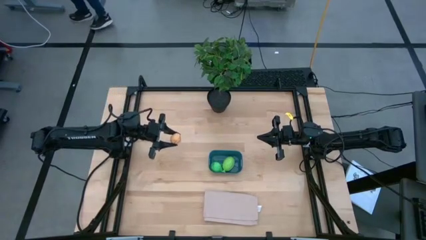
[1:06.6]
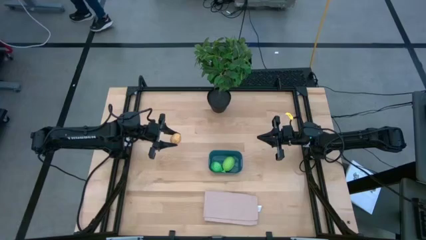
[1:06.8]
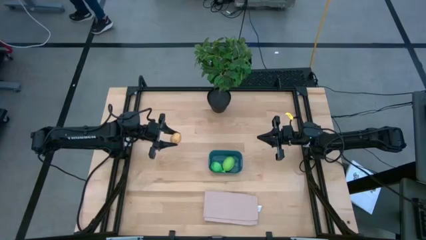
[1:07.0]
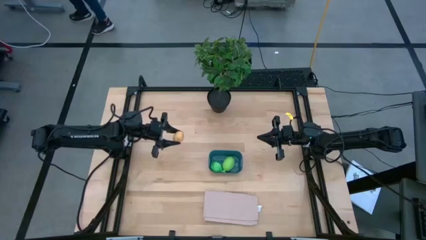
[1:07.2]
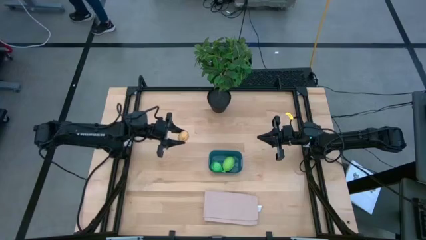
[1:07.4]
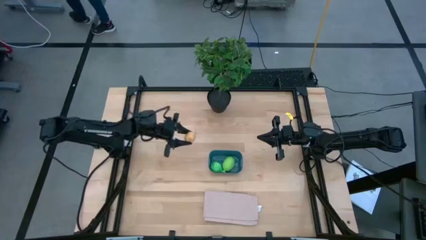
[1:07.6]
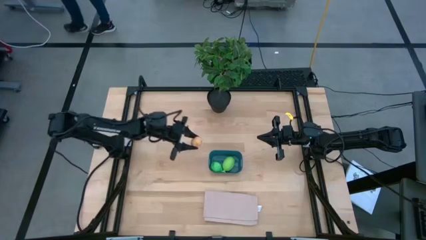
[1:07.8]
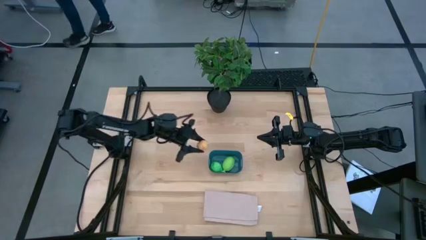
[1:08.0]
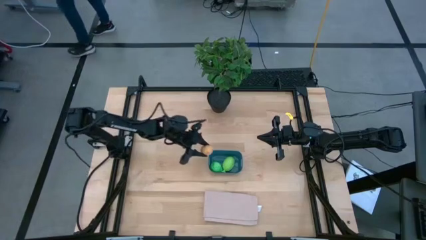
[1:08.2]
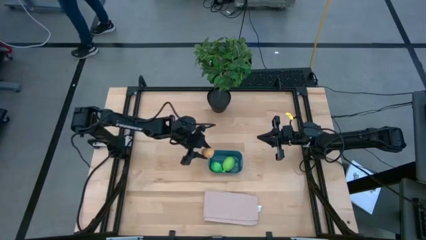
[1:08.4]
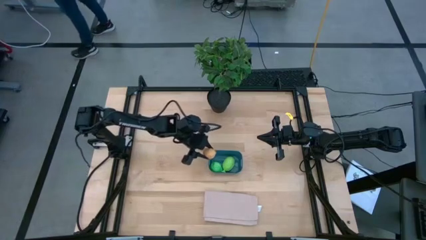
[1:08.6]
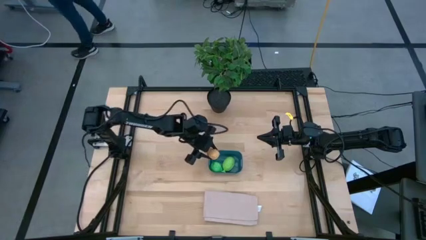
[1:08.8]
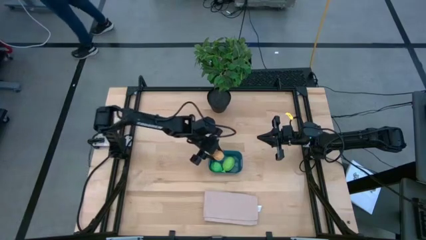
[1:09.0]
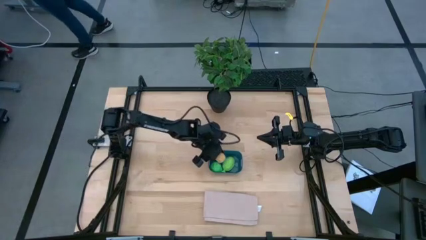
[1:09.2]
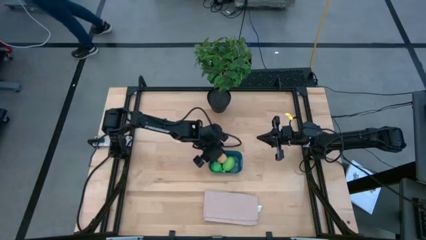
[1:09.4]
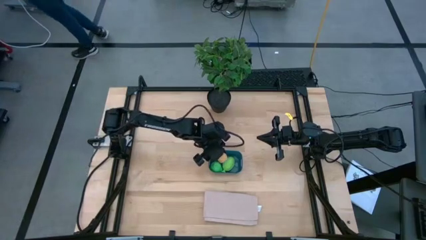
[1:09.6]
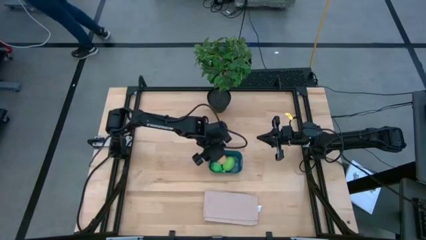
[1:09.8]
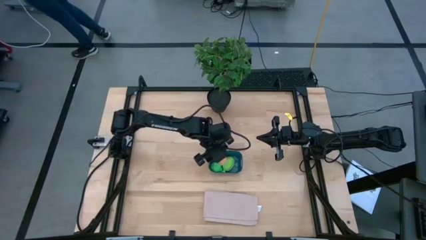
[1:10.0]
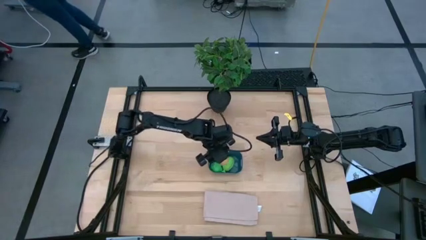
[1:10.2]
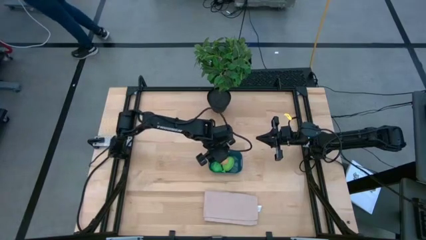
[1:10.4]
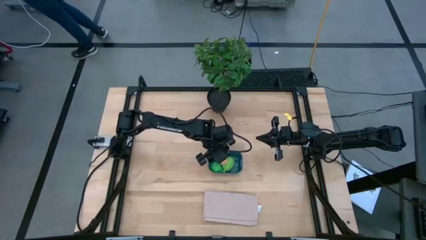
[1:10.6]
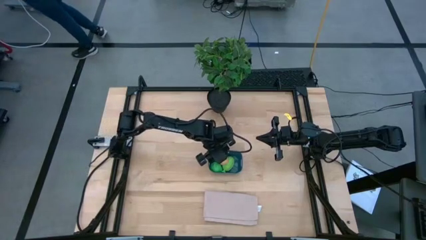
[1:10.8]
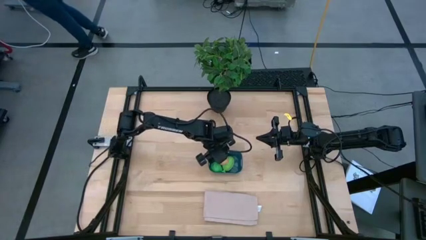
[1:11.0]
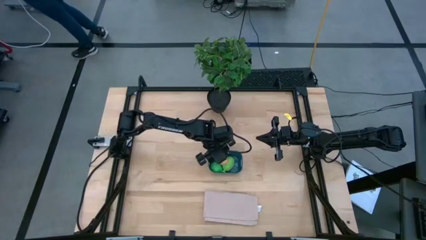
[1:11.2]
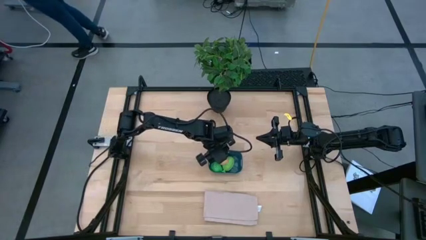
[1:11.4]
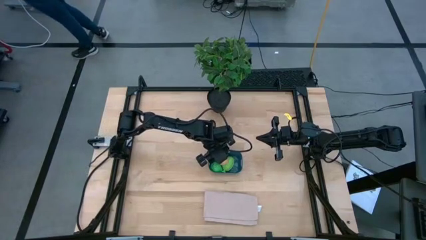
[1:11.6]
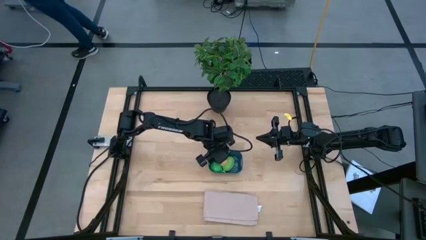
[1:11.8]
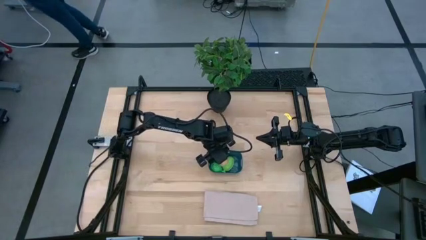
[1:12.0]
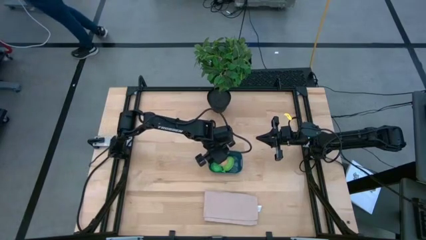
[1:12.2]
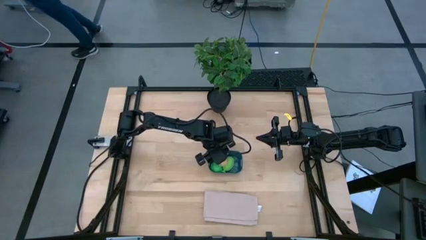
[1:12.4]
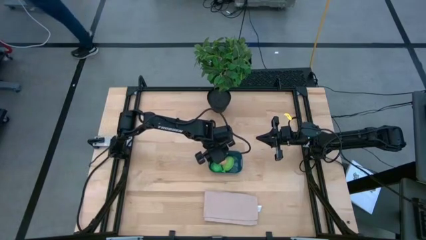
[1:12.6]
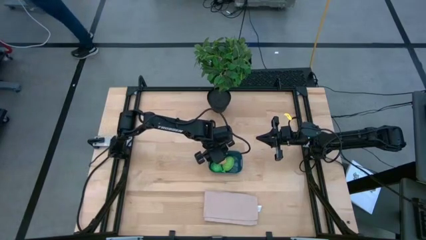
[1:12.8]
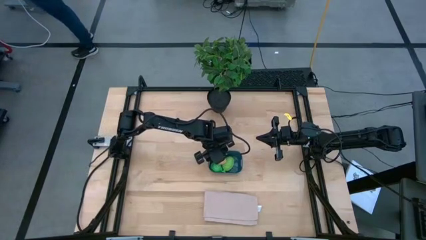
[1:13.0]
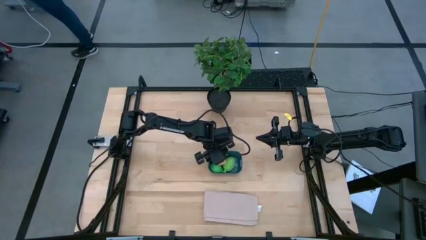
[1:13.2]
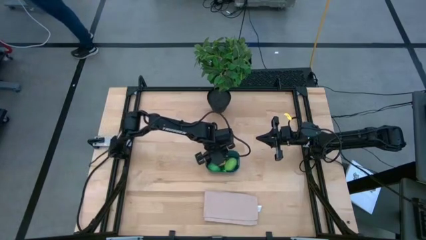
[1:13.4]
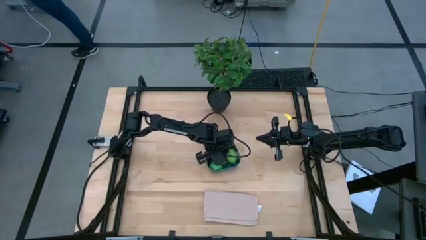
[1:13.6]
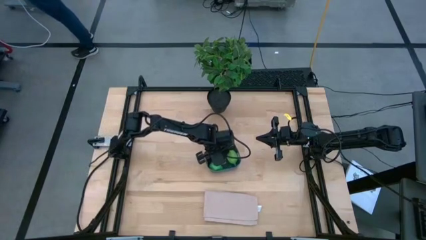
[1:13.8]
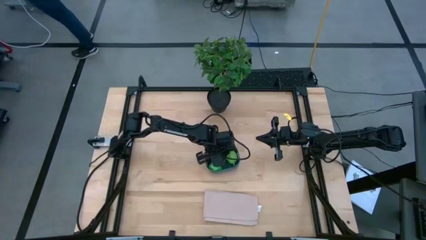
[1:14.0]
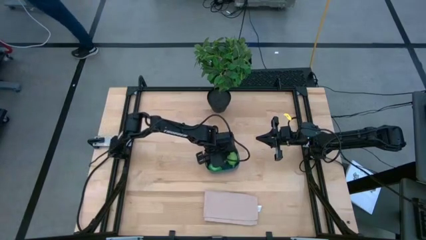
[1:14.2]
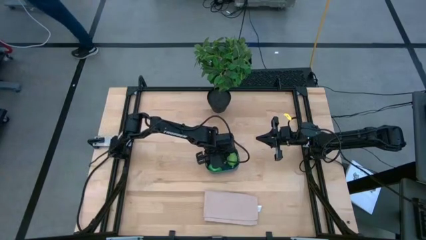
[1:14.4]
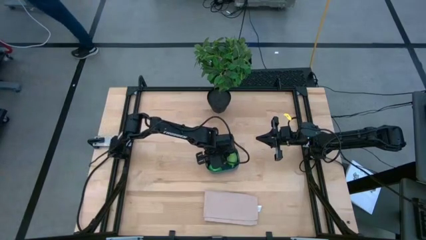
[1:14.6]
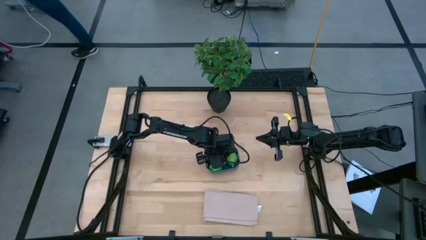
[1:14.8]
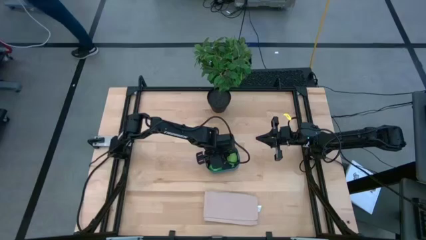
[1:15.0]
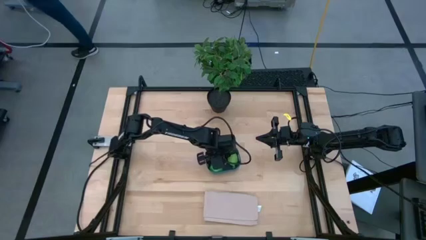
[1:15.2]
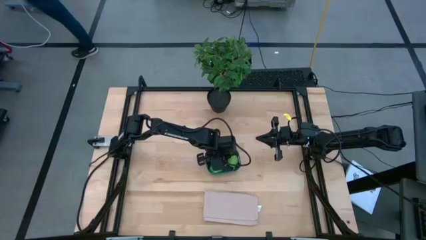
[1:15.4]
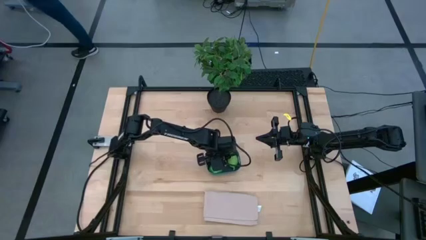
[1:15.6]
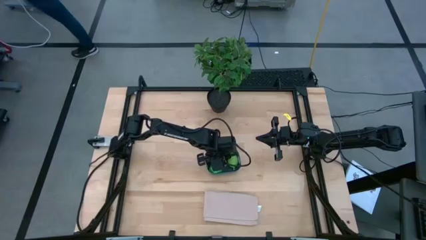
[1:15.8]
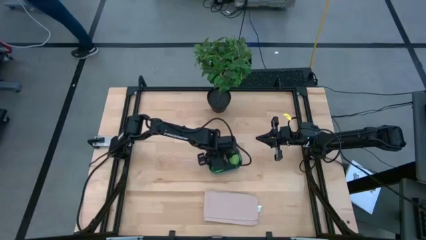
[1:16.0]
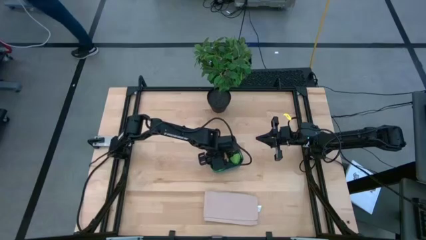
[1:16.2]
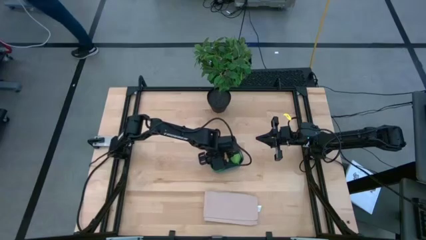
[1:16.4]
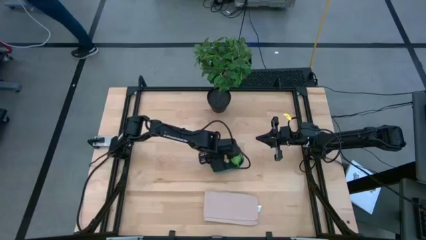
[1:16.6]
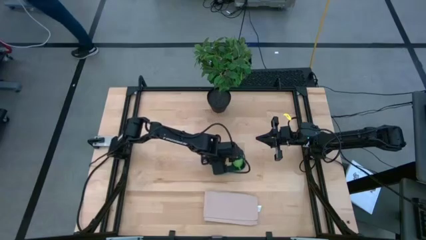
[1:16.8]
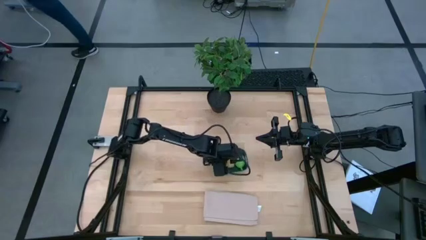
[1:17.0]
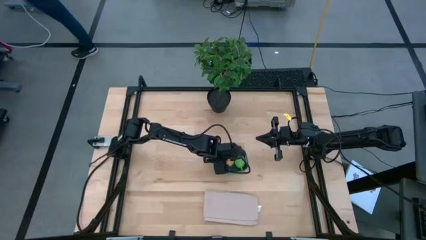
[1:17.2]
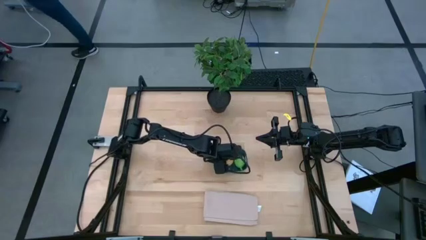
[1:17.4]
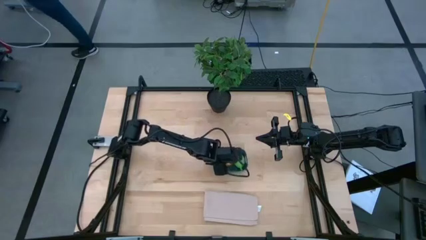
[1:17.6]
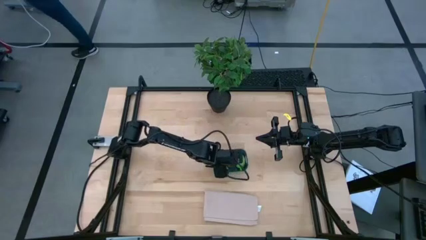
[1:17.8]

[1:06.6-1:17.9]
Task: Pick and placing Produce into tupperware
Put the potato into the blue container
